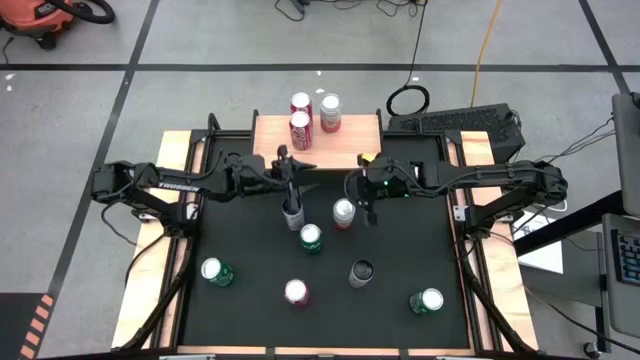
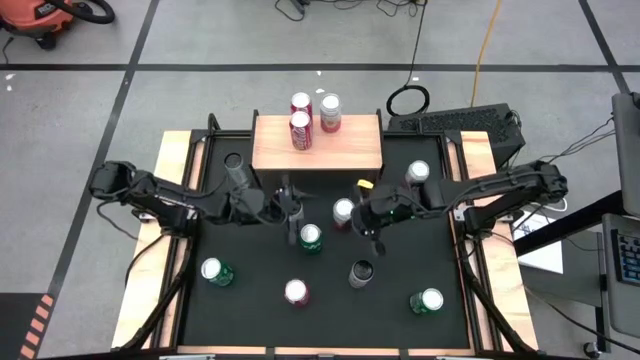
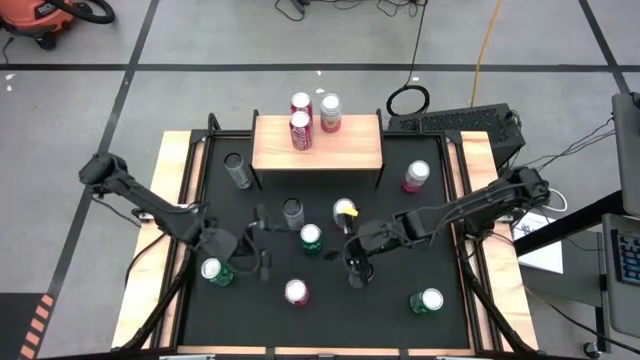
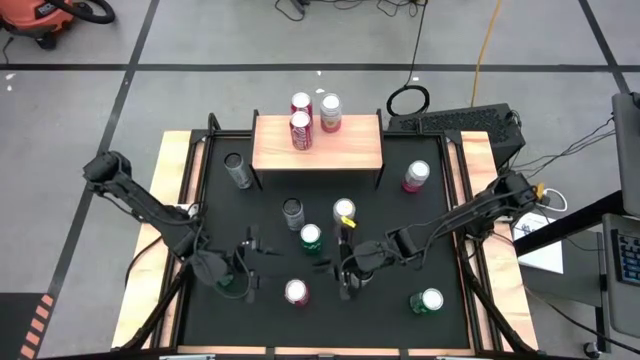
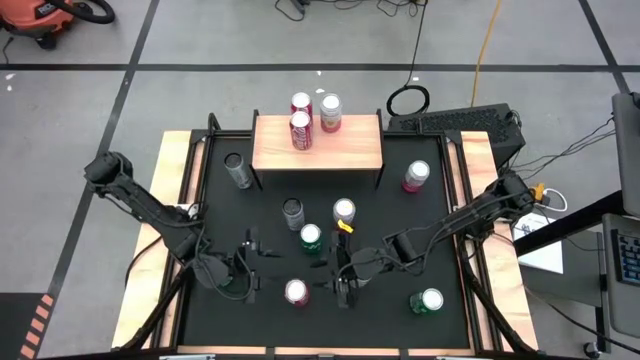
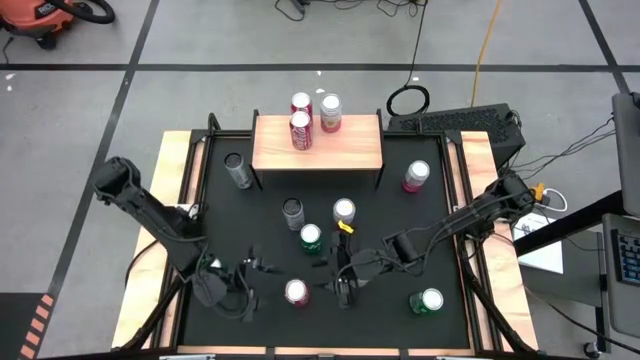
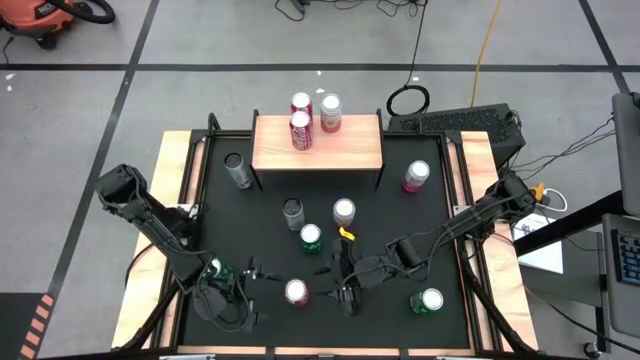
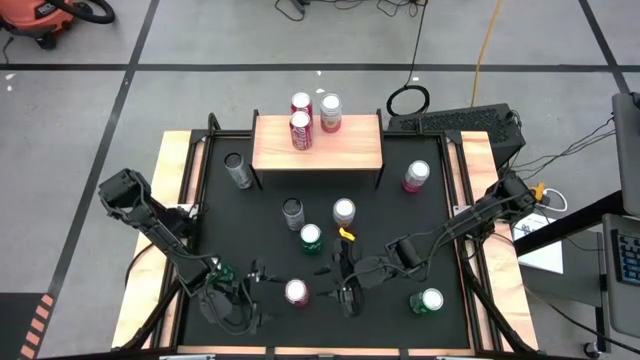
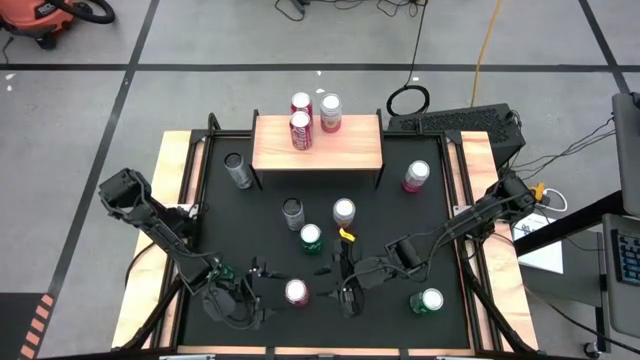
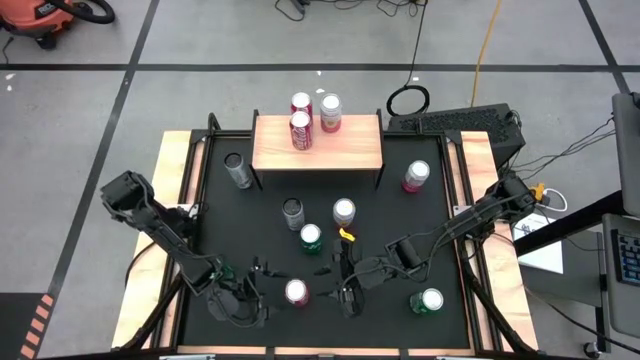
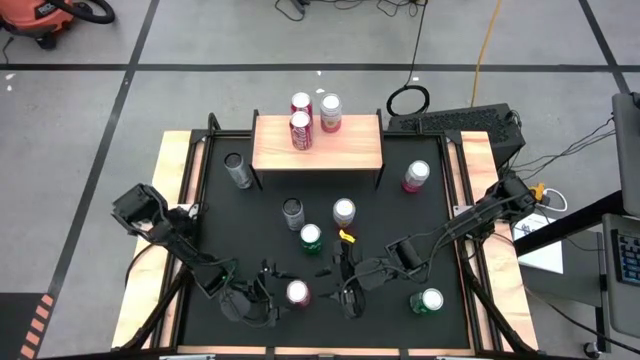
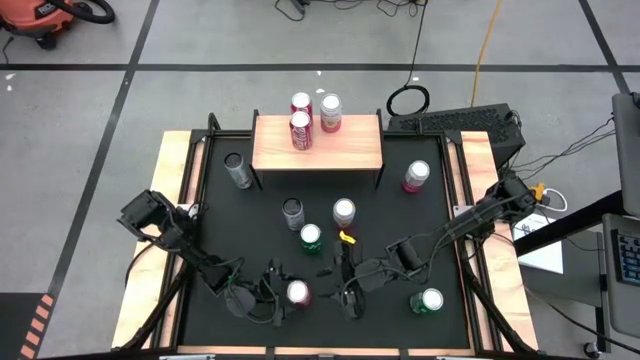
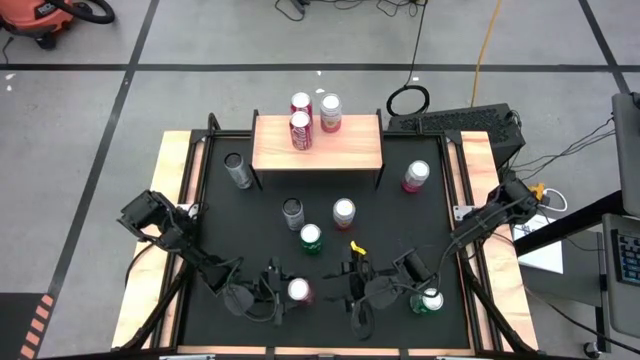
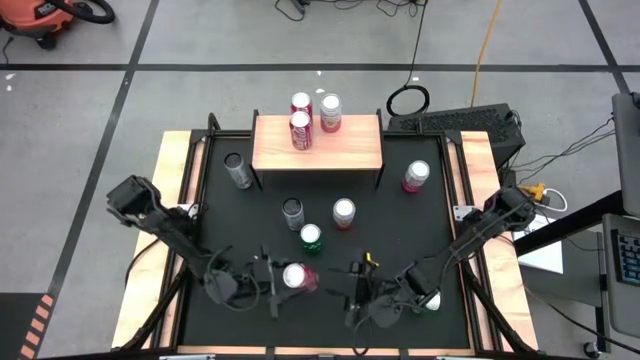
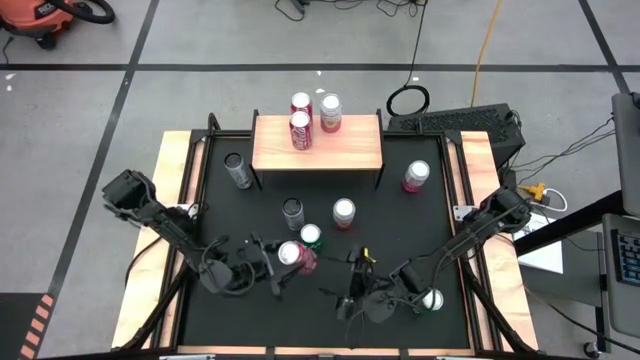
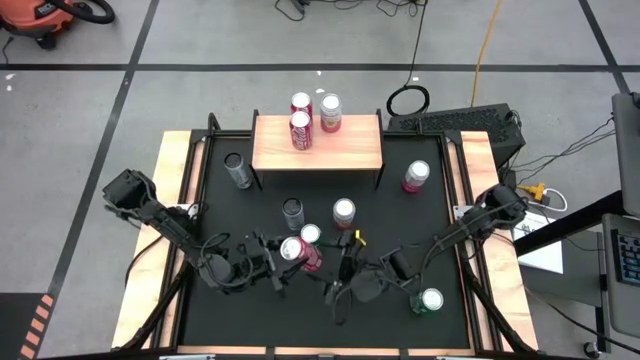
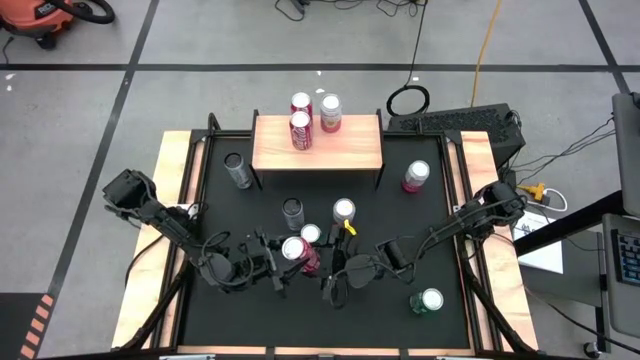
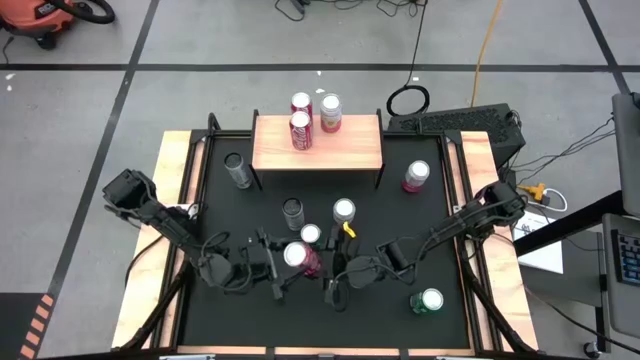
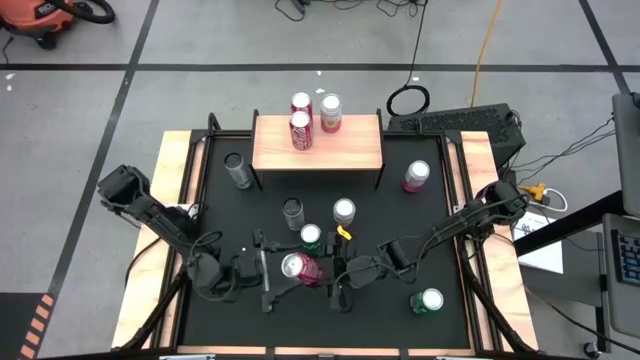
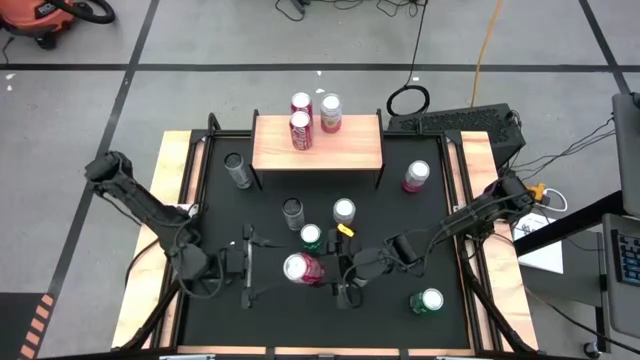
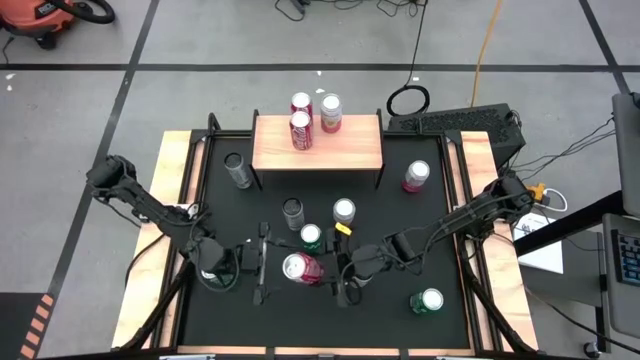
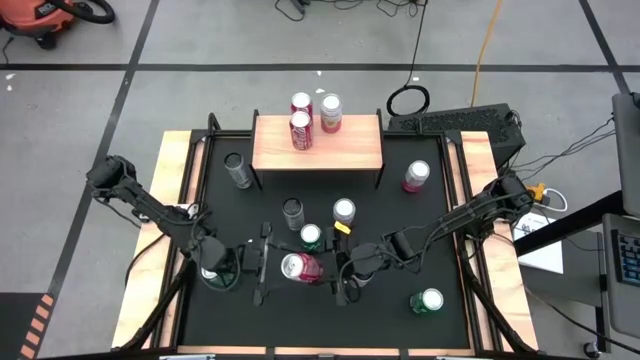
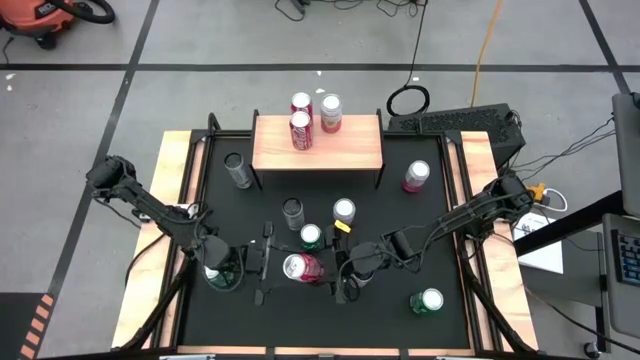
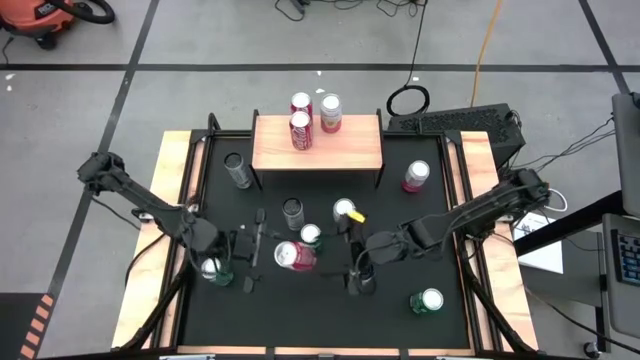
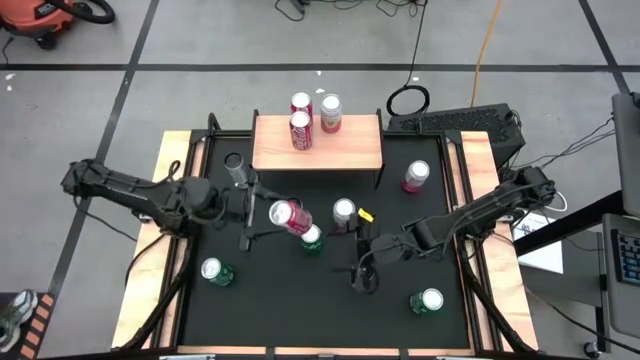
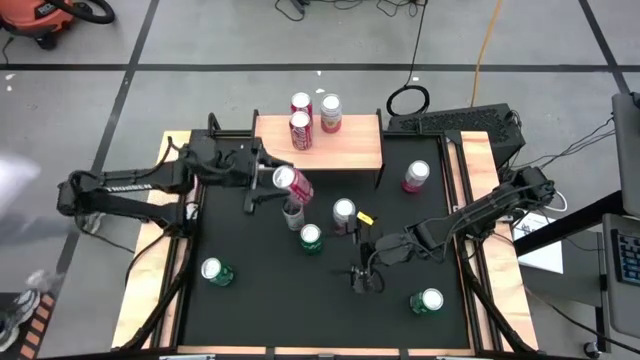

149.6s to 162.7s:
Task: Place canned beverage on shelf
Put the red soda can on the shelf aligned with the other red soda cans

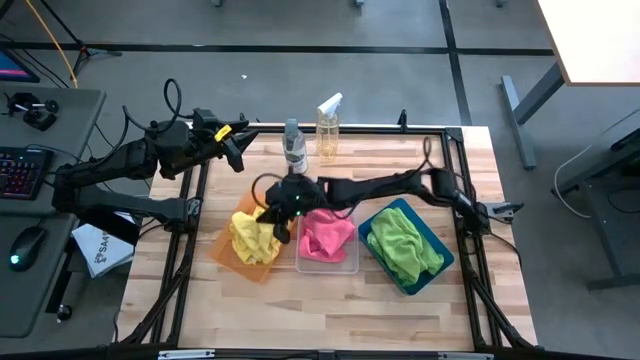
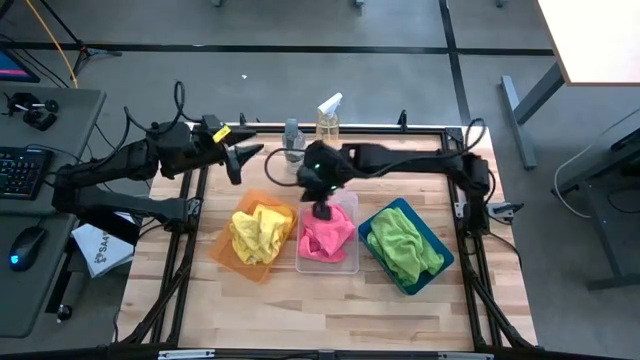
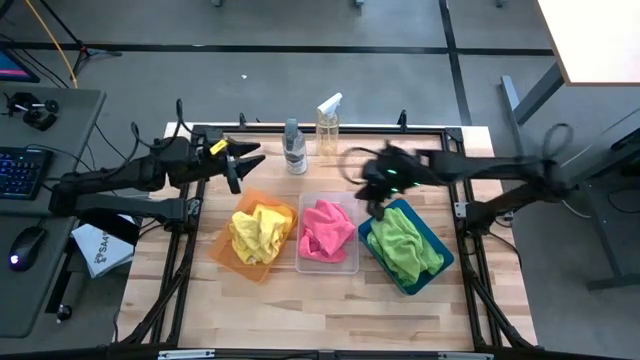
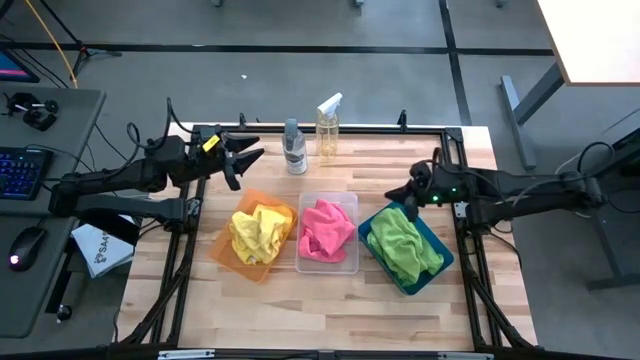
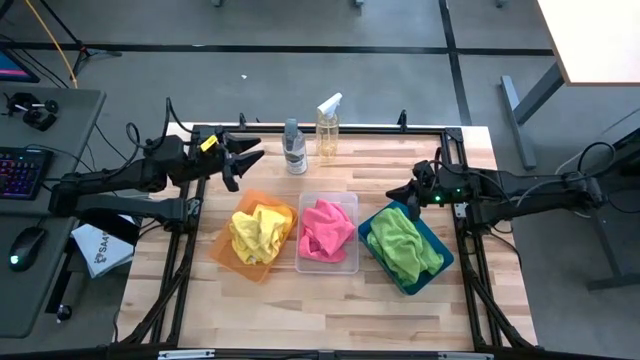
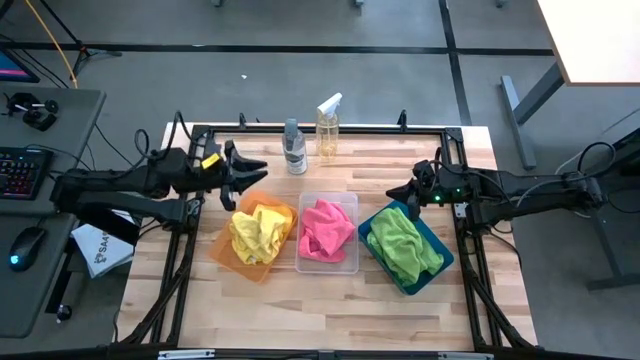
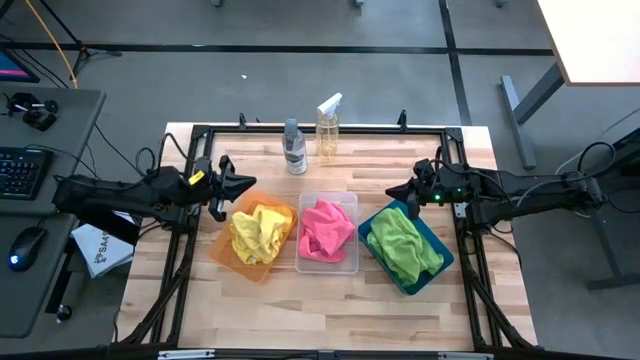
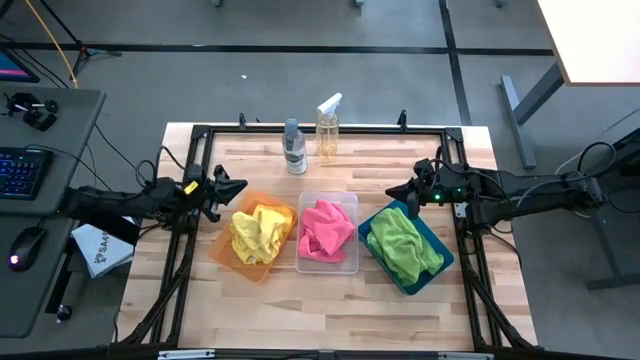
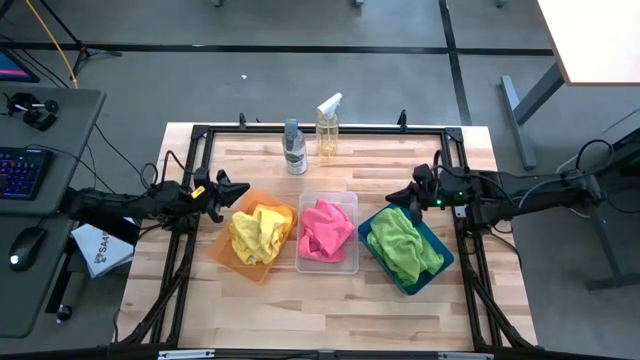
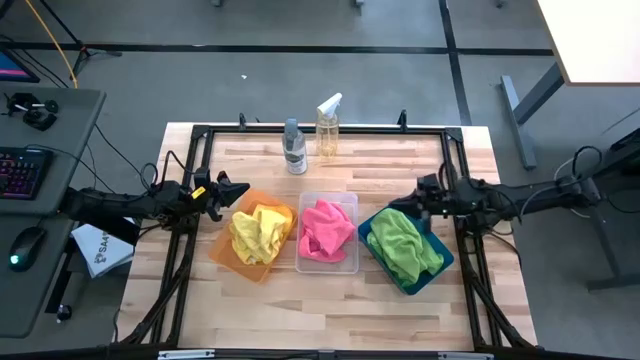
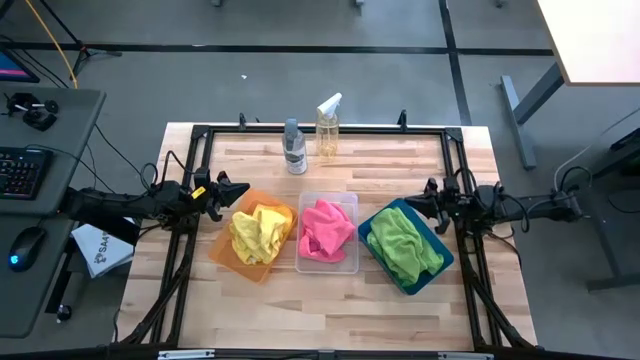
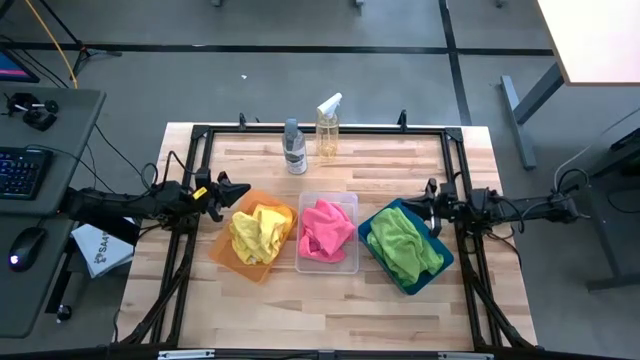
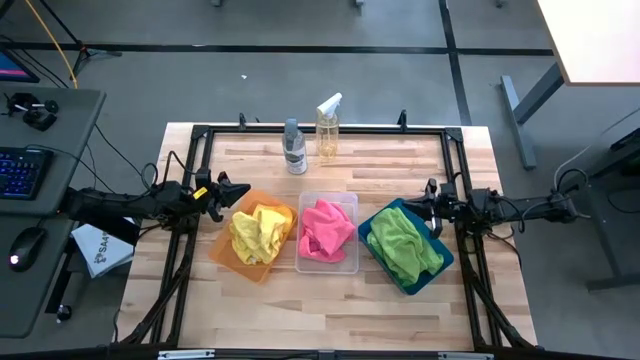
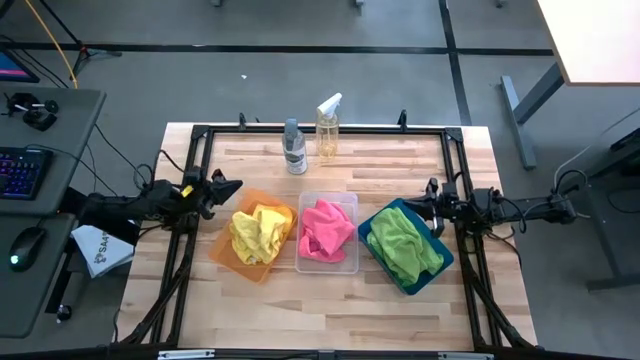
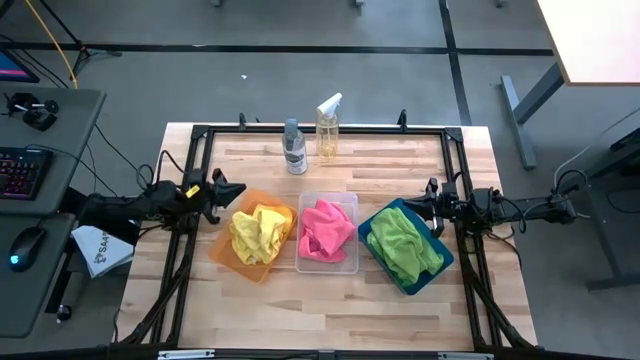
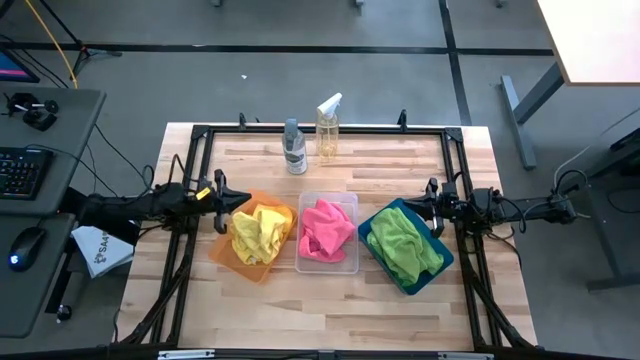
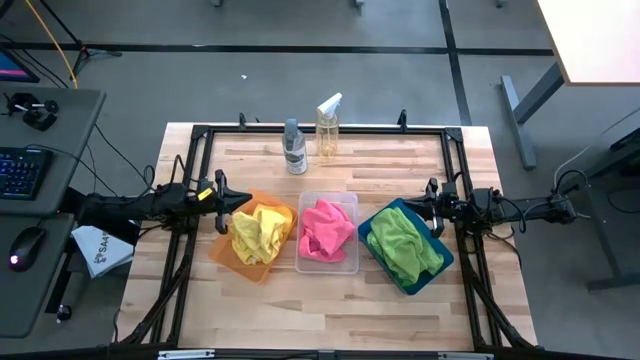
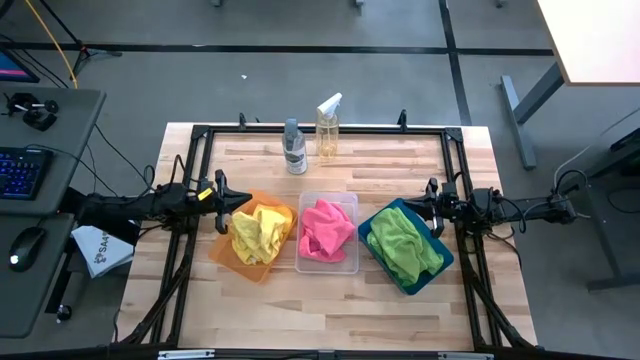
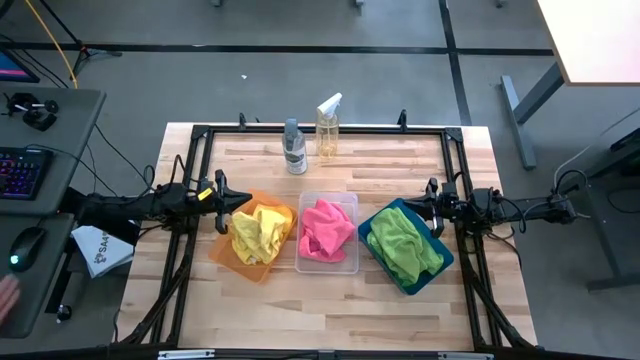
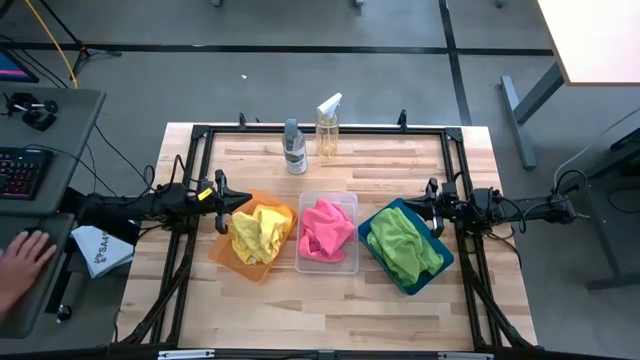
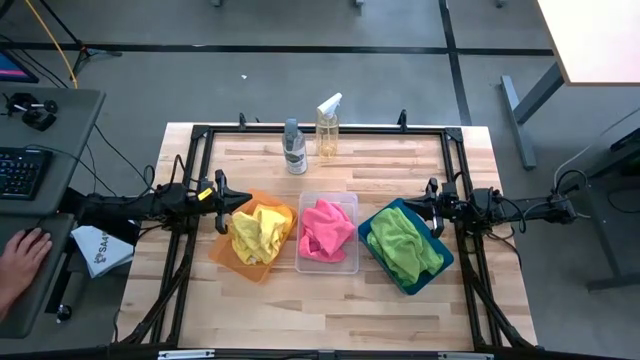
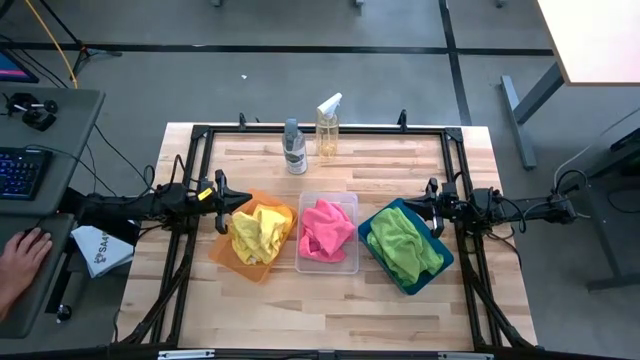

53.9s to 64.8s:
Task: Sort microfiber towel by color & place in baskets
Return to Home Position
